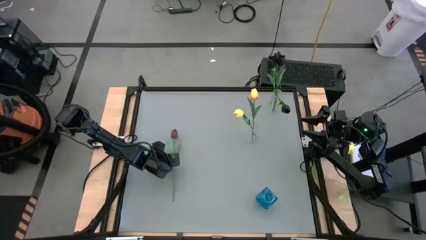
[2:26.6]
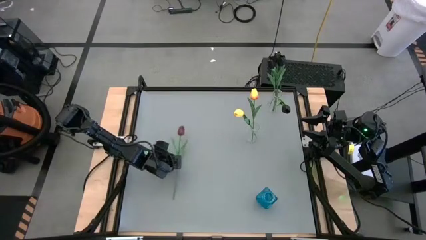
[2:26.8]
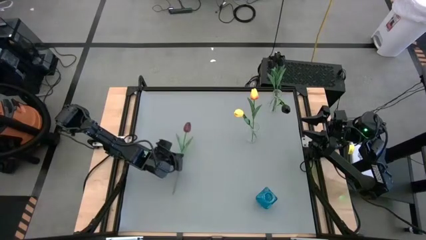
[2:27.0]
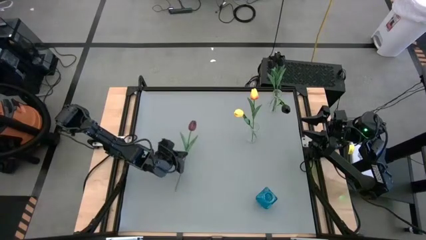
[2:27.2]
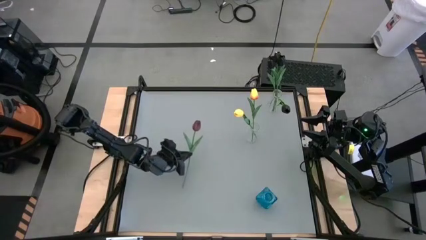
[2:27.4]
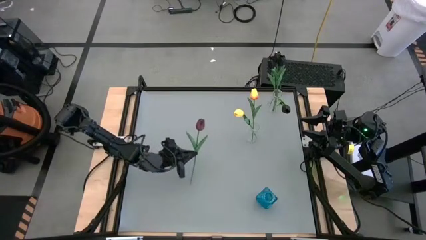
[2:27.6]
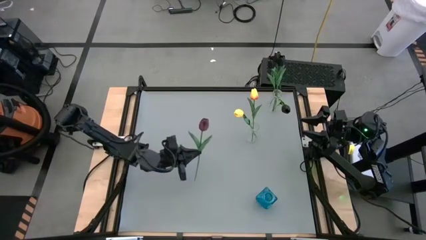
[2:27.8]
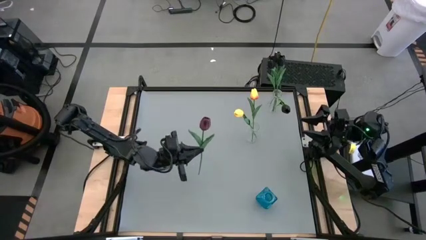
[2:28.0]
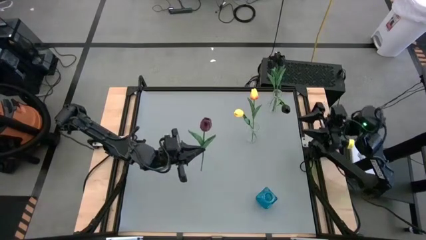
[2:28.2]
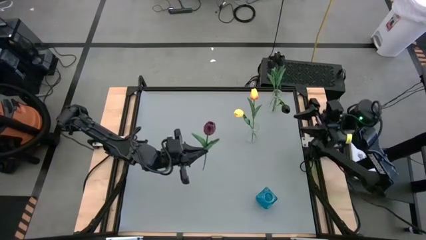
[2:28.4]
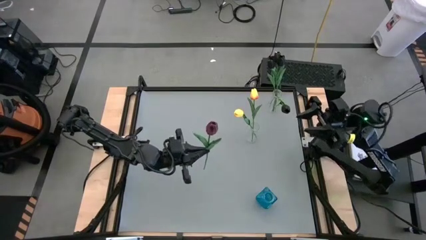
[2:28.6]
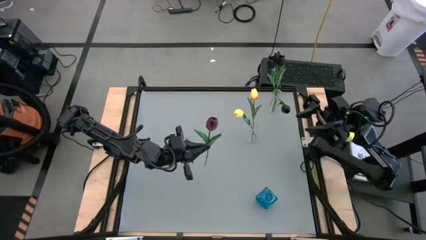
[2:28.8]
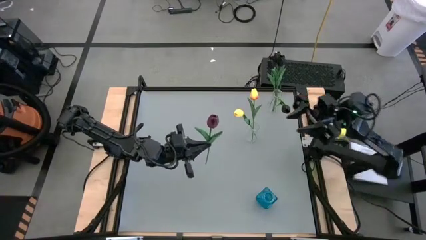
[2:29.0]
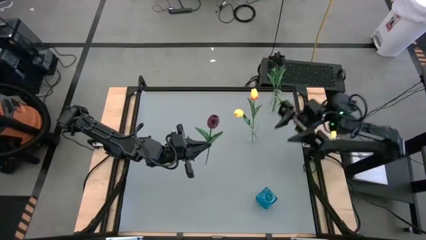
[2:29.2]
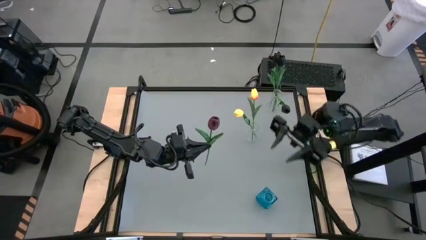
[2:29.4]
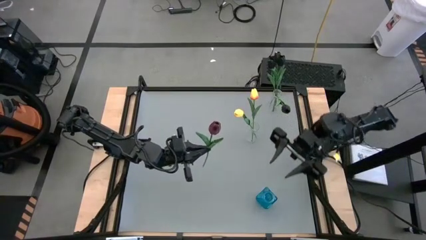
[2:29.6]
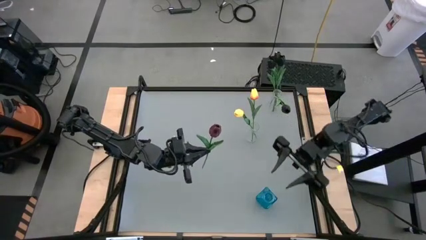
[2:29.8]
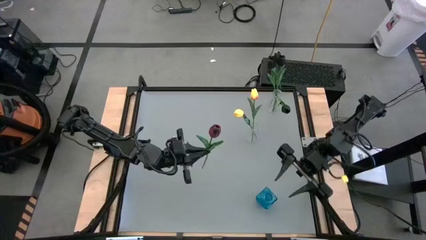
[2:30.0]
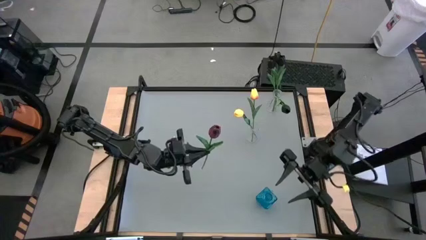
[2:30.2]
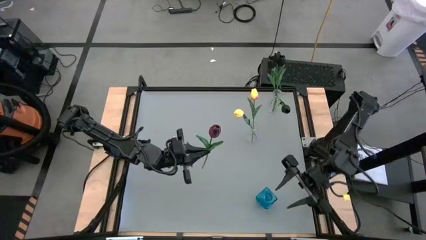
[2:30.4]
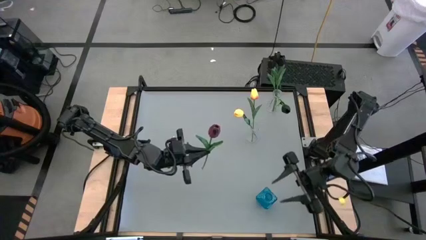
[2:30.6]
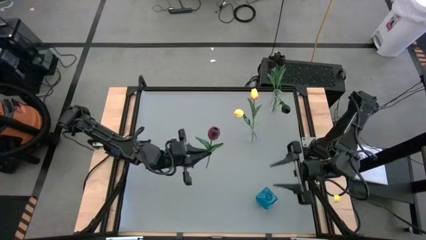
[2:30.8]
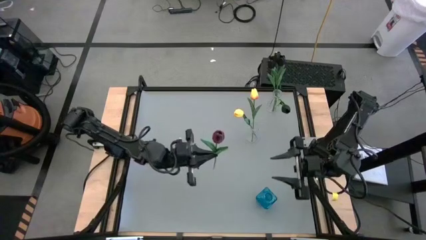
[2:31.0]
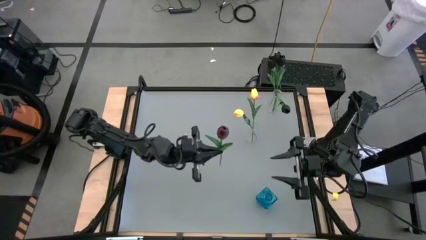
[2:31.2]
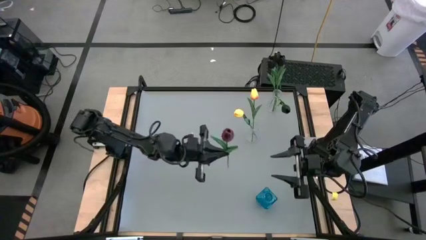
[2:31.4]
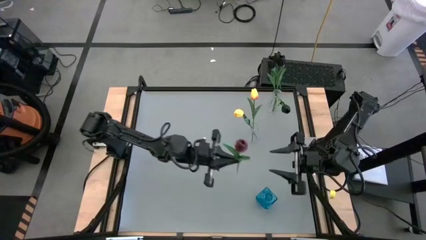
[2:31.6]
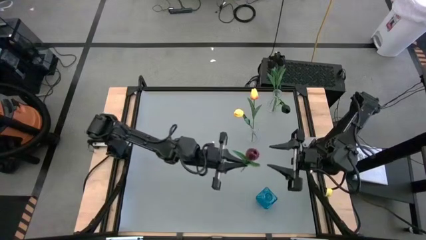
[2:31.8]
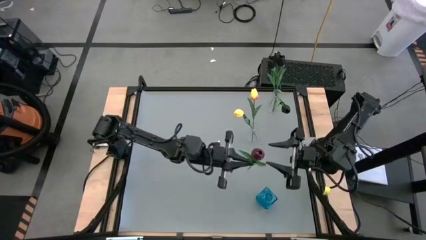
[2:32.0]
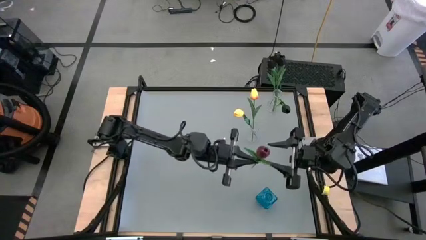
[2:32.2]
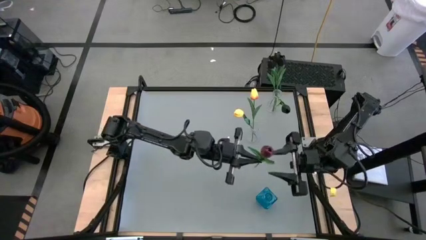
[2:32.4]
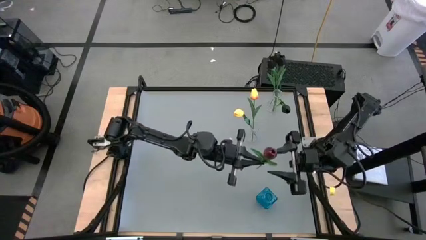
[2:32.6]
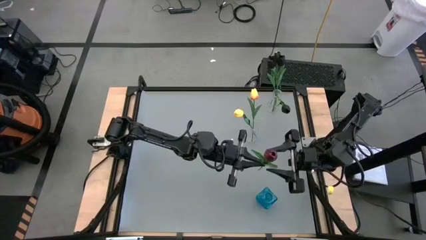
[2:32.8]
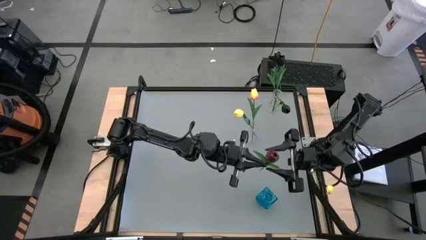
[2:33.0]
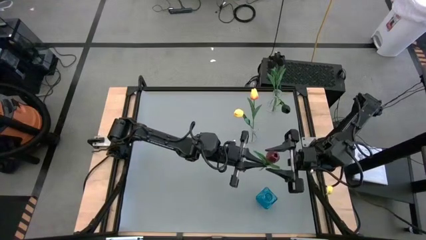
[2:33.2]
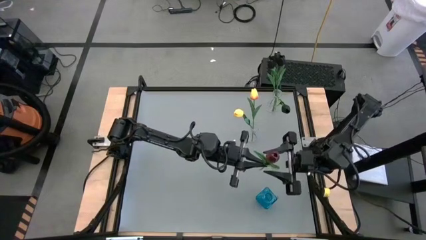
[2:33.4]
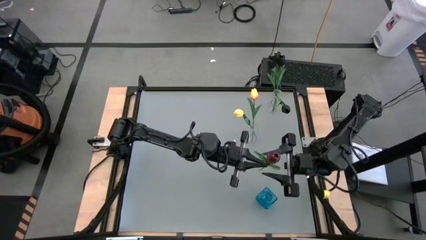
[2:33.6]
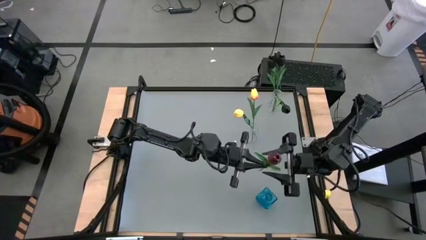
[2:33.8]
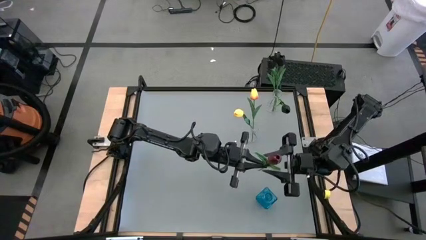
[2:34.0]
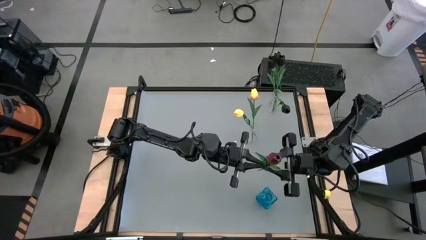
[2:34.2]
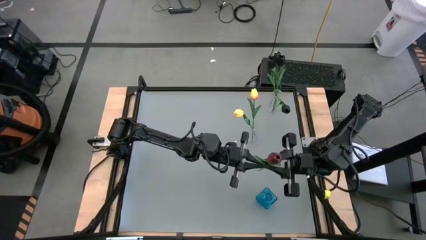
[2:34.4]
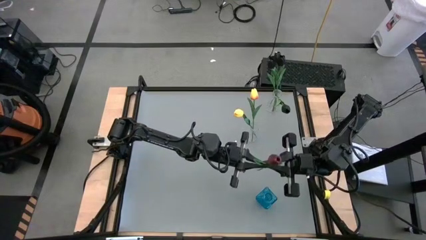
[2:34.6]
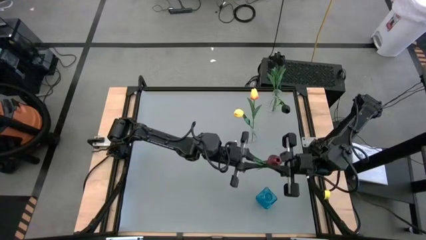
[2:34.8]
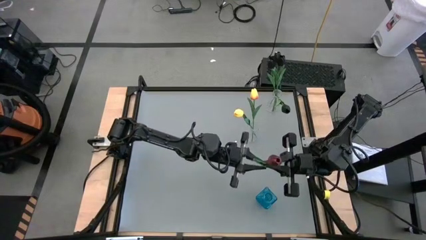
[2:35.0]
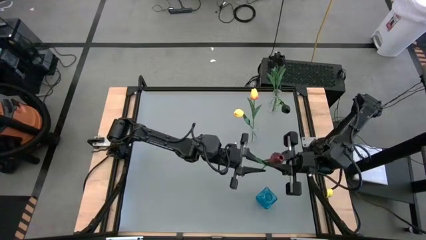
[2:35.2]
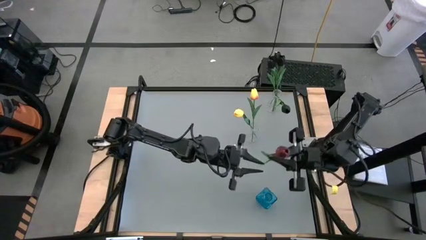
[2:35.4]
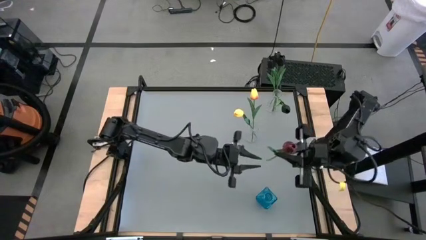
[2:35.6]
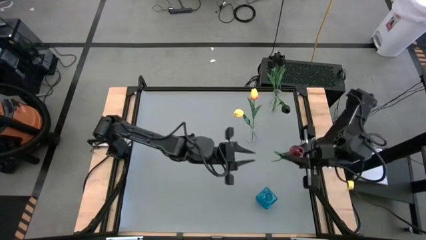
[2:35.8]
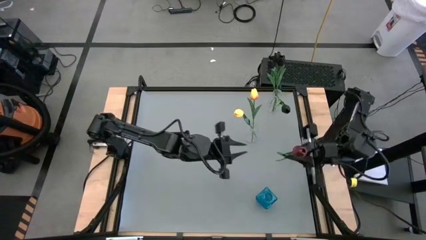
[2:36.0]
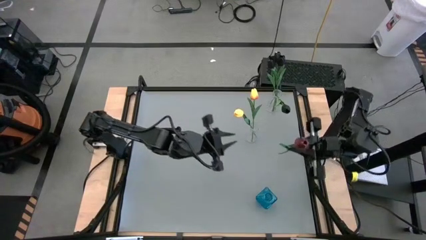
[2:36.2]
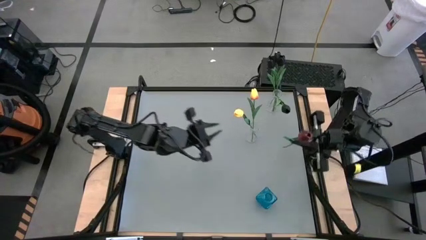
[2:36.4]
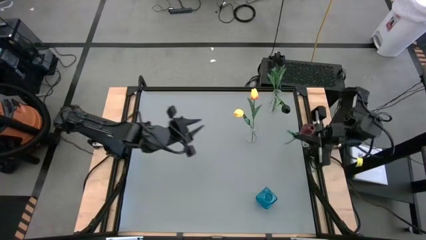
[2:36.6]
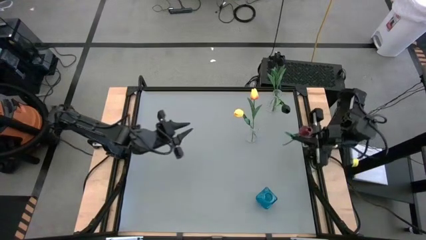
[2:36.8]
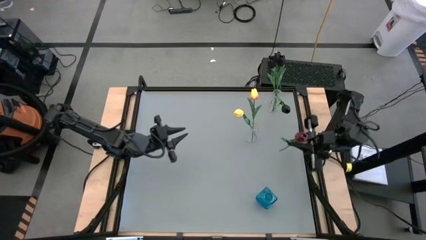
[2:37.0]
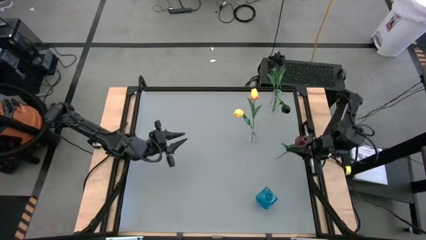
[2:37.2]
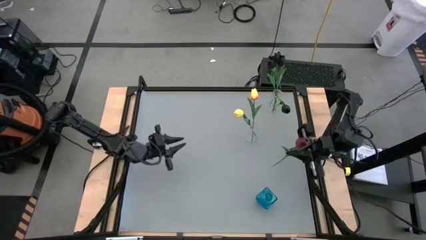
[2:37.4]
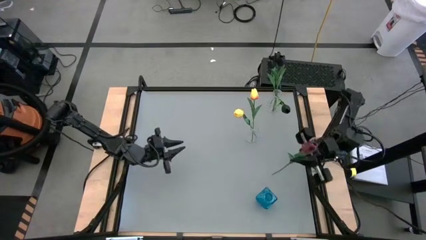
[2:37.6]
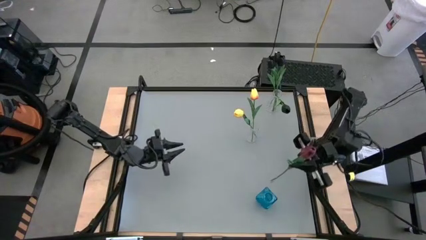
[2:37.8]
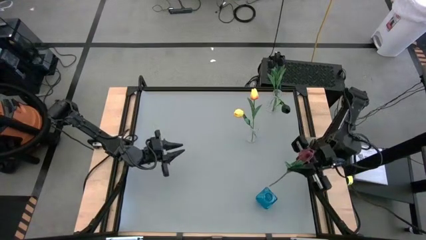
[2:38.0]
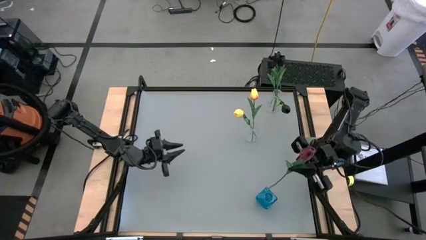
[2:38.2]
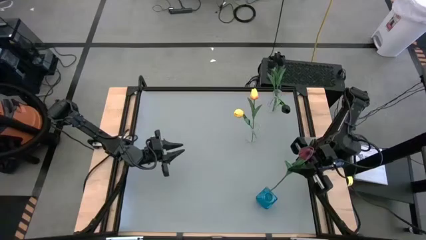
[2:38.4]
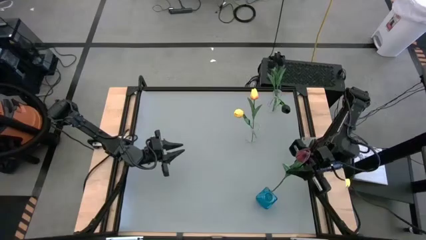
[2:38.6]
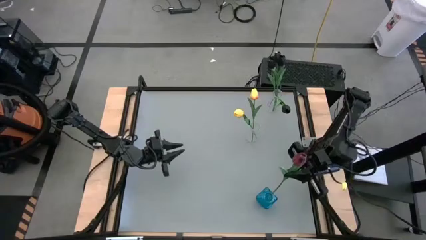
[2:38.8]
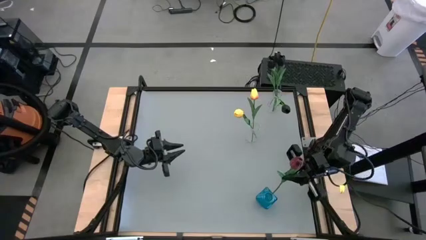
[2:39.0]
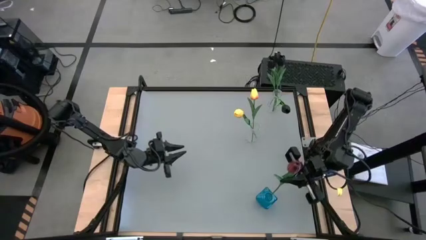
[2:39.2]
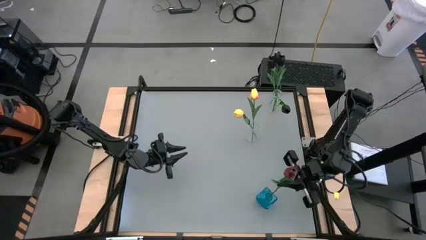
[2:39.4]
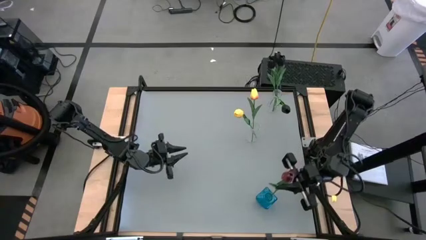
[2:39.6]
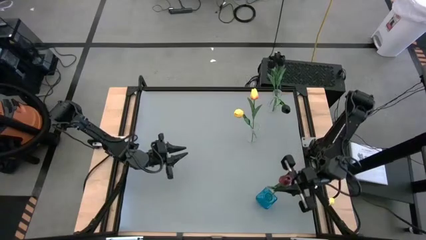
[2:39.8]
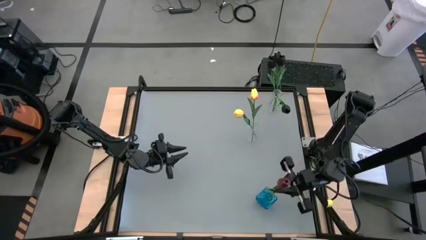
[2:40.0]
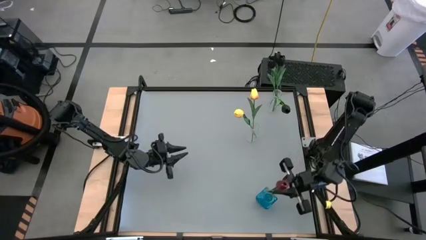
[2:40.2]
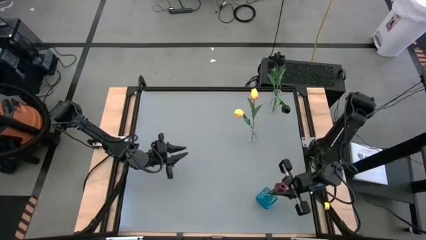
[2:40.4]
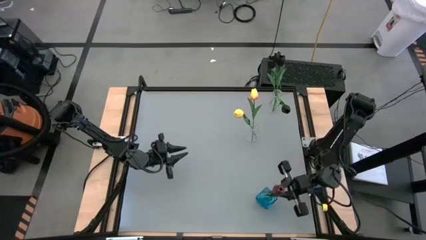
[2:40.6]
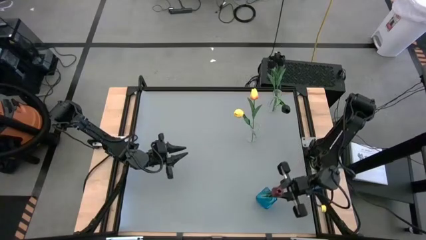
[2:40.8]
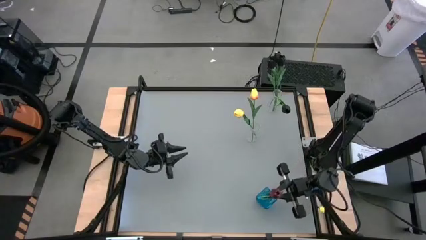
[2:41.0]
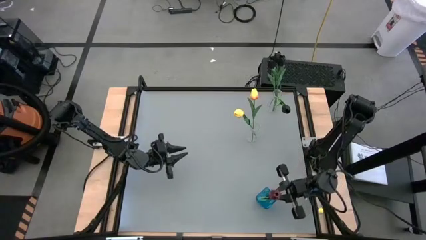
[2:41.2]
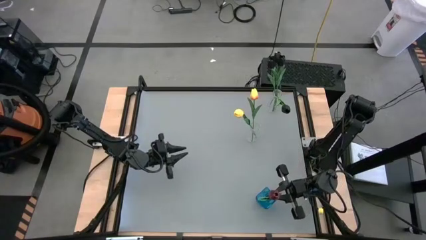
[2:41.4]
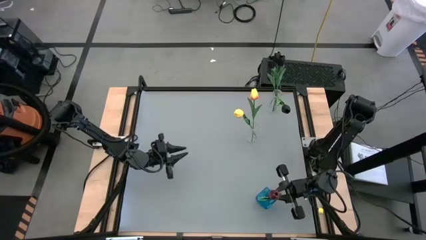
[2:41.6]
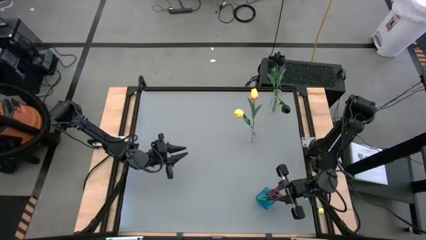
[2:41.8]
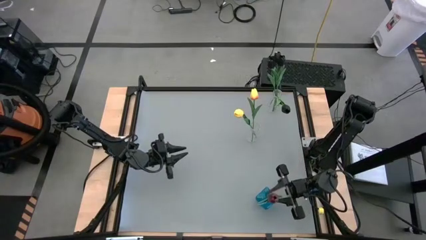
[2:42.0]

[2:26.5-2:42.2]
Task: Sort flowers into vase by color
Put the red tulip into the blue vase

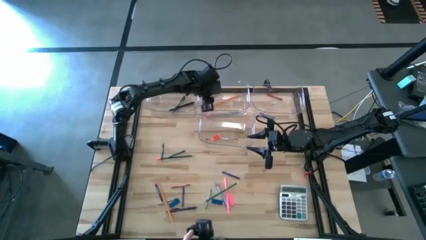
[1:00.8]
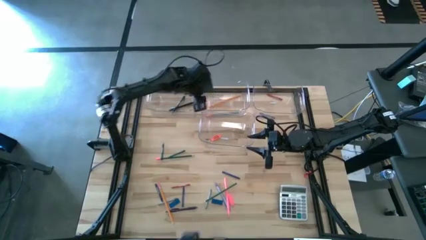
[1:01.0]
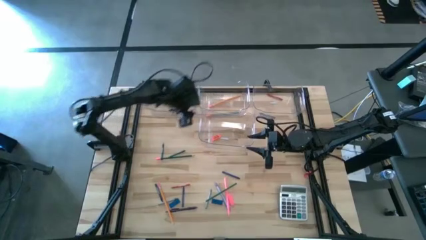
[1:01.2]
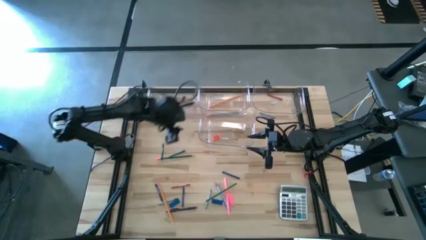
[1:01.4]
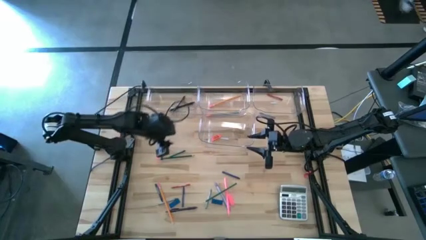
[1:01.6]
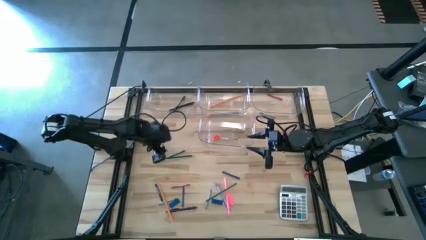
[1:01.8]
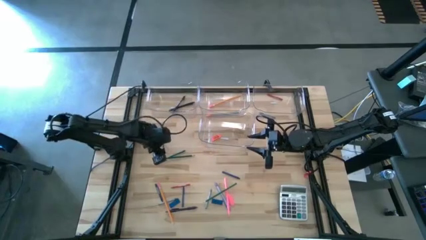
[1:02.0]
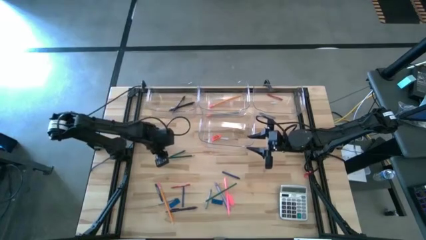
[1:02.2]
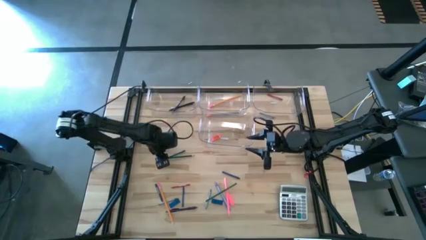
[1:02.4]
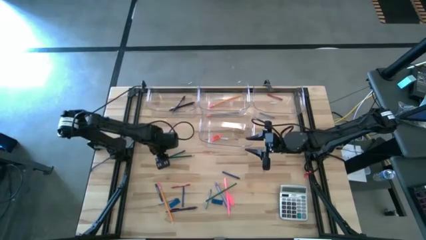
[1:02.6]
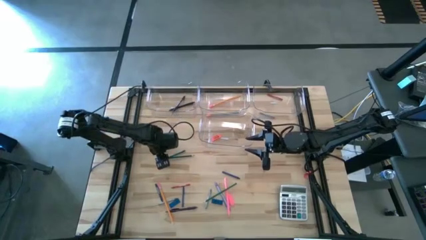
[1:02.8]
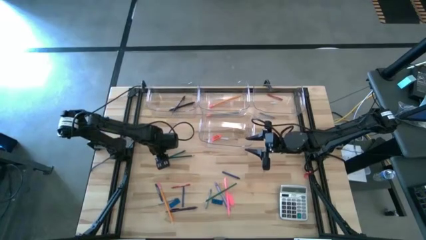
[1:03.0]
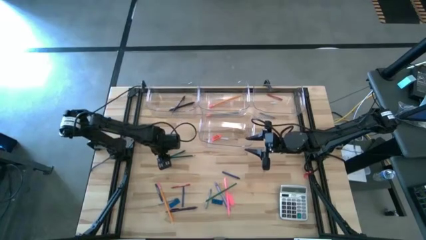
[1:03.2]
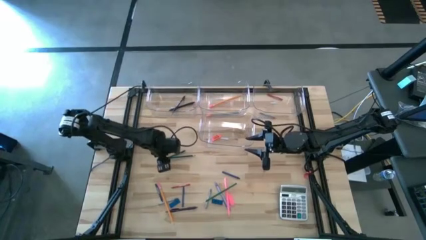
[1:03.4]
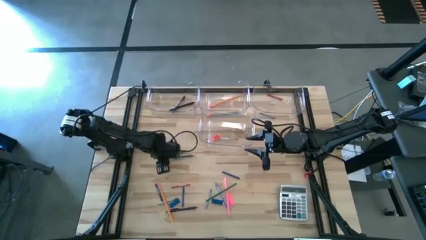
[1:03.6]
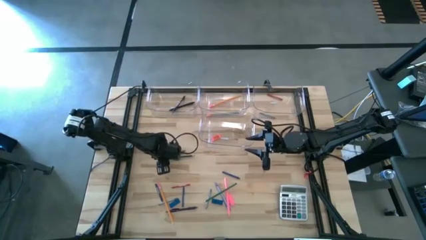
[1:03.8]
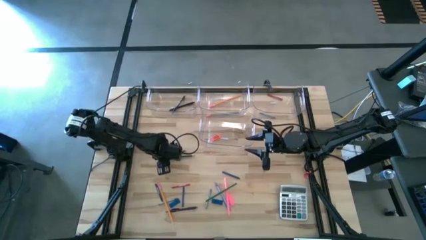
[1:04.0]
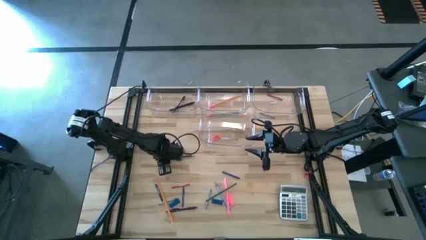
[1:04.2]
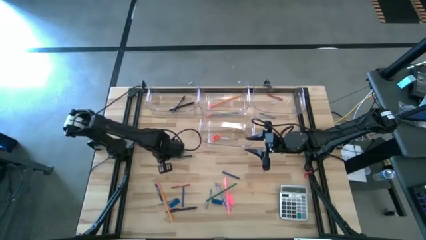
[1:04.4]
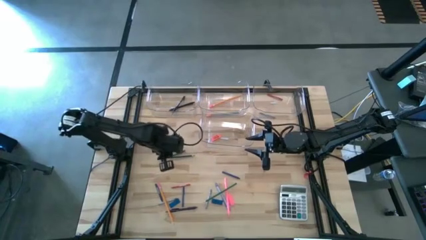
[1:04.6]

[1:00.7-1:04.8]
Task: Sort crayons/erasers/pens/pencils in bins
Put the green pencil into the top center transparent bin
